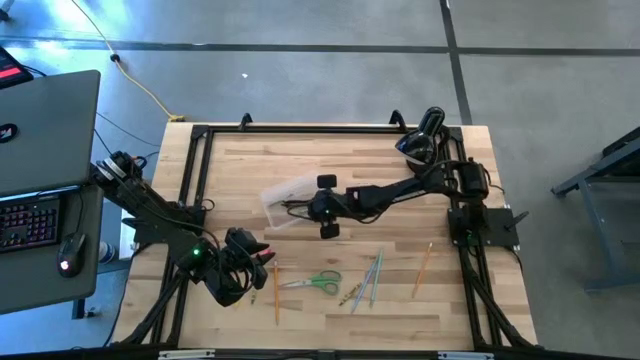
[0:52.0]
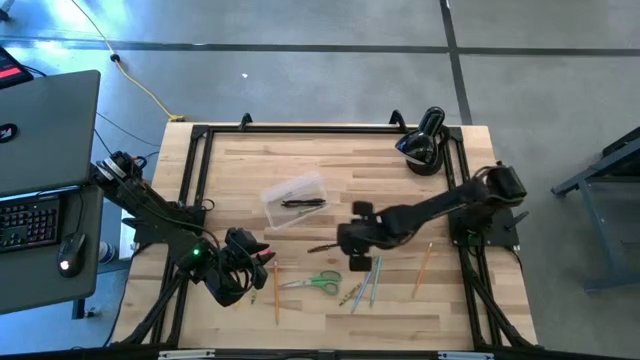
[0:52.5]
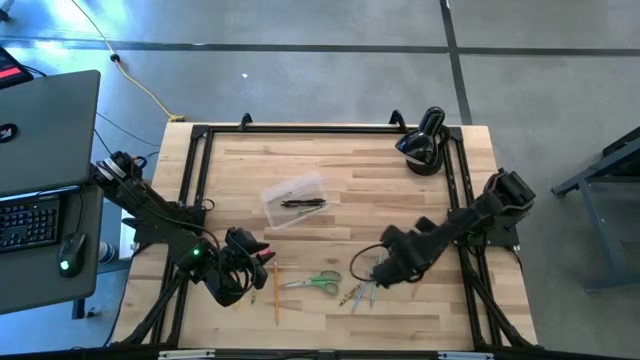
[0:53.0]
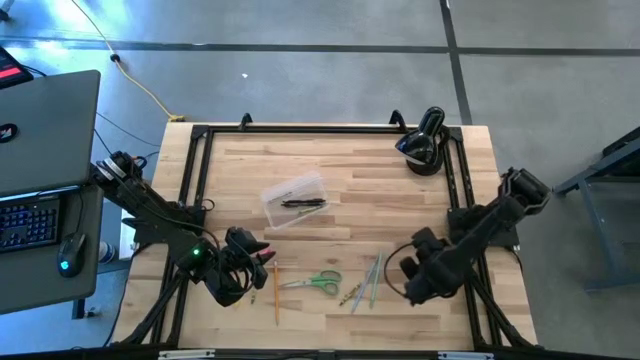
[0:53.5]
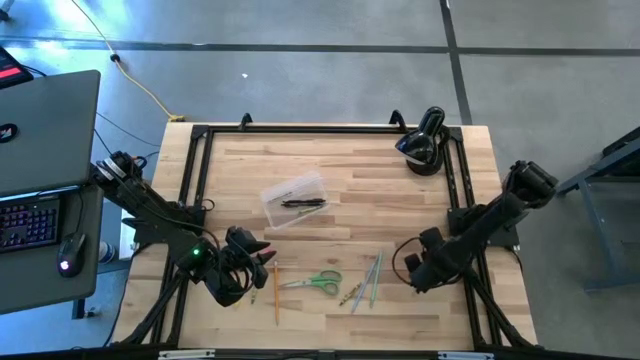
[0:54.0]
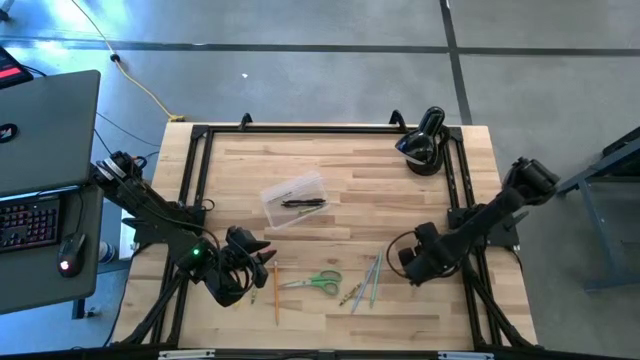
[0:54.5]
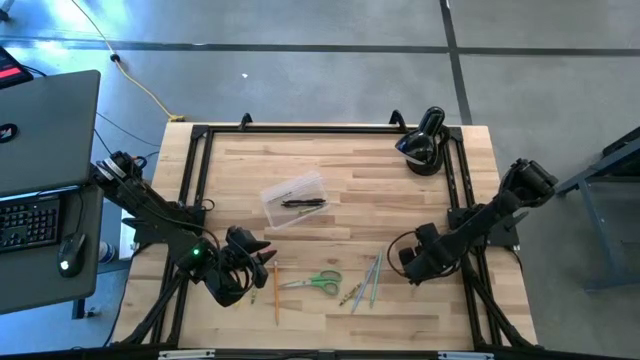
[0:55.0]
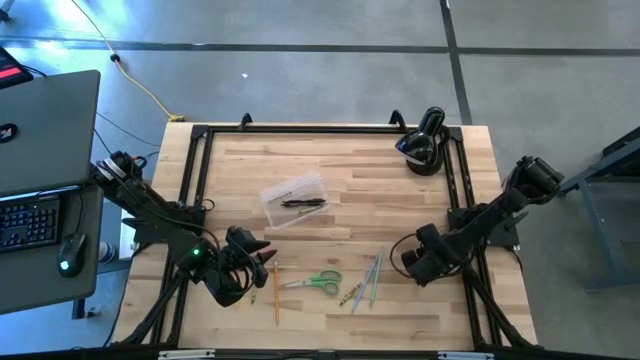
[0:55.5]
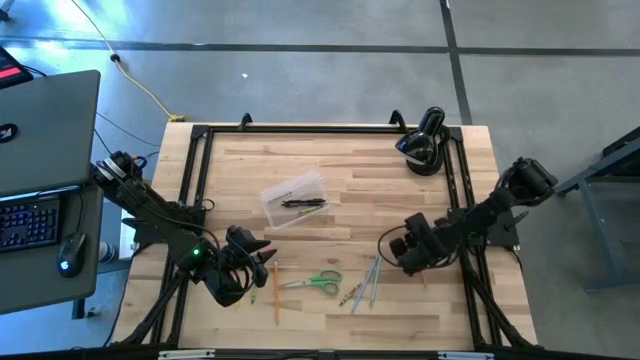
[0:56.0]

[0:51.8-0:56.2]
Task: Pick & place school supplies into a supply box
Put the right yellow pencil into the supply box

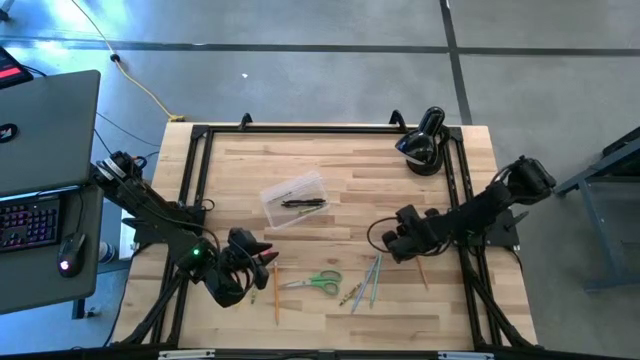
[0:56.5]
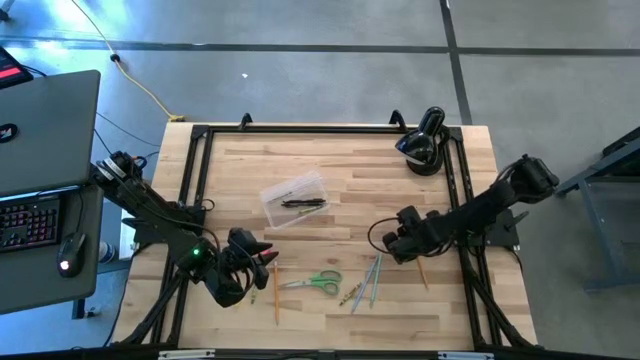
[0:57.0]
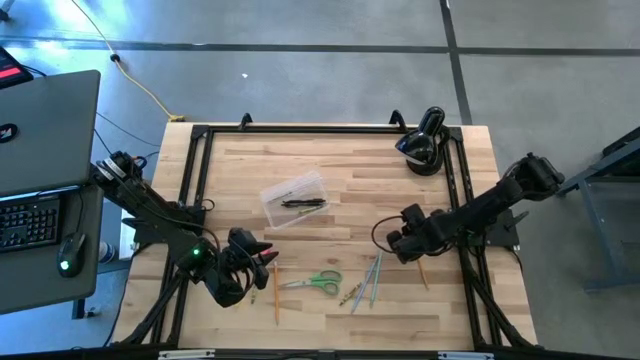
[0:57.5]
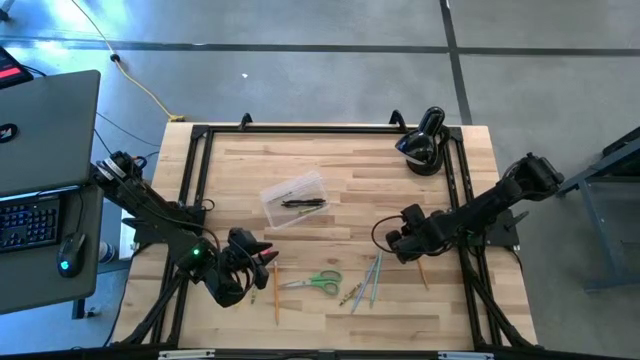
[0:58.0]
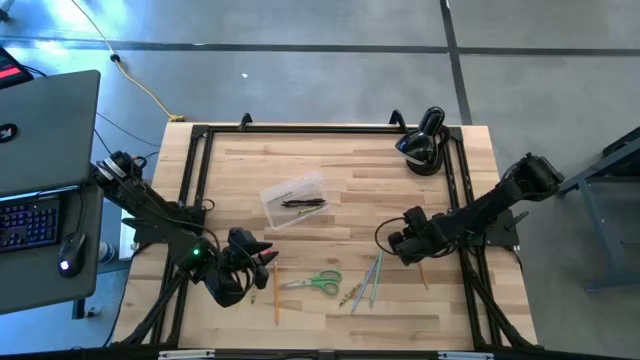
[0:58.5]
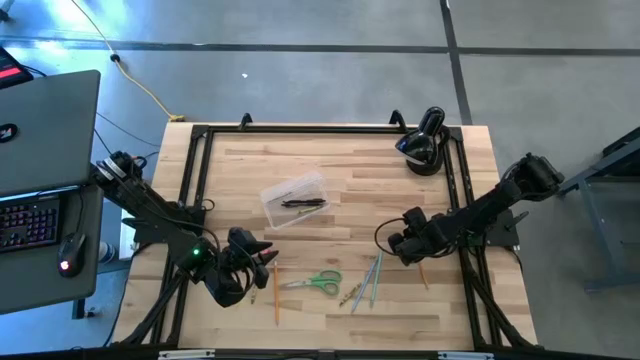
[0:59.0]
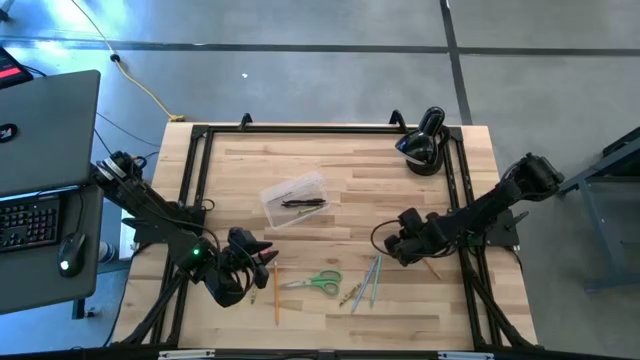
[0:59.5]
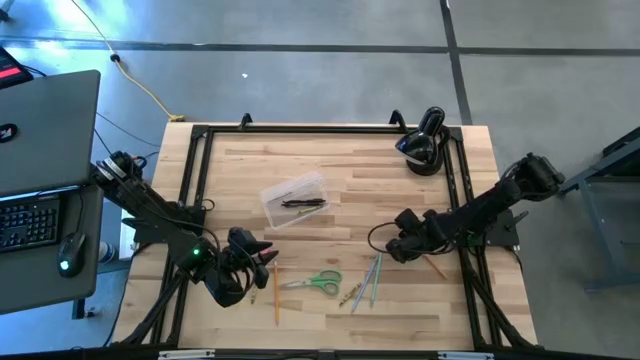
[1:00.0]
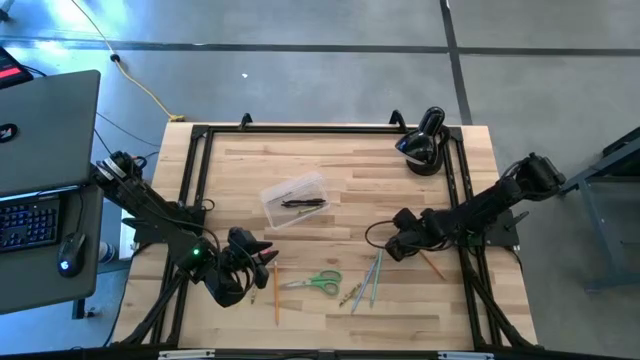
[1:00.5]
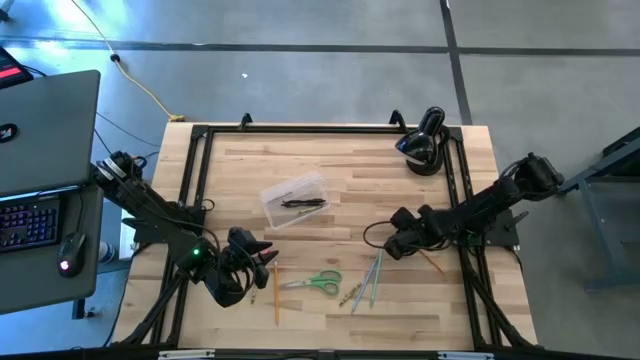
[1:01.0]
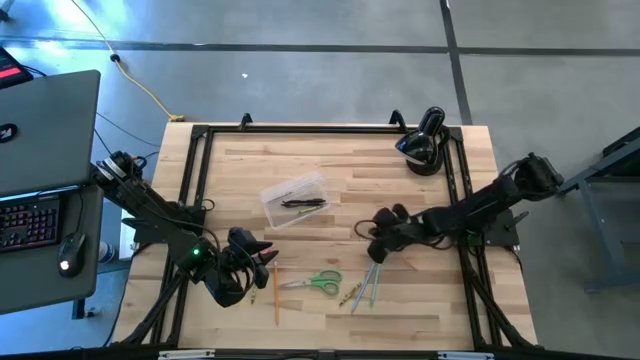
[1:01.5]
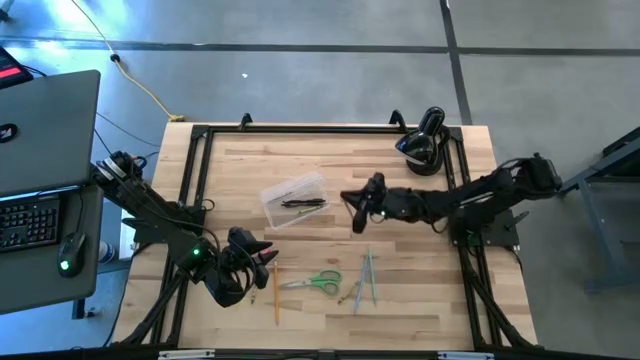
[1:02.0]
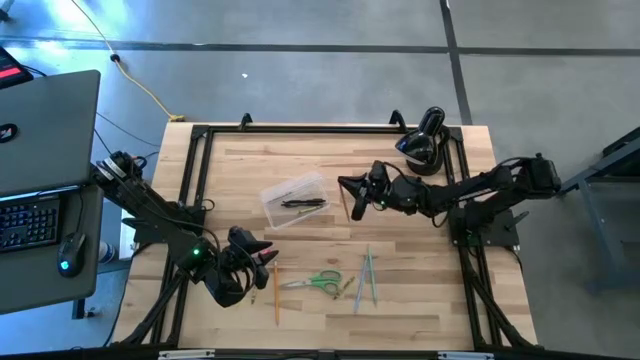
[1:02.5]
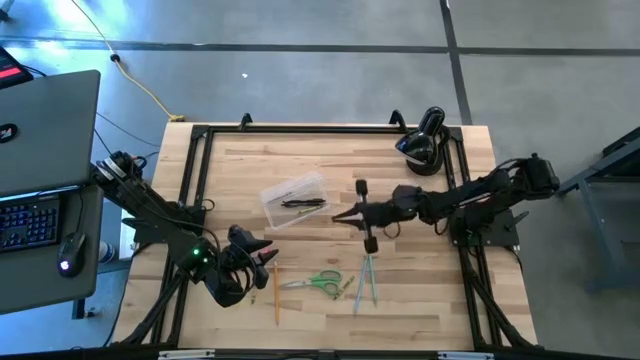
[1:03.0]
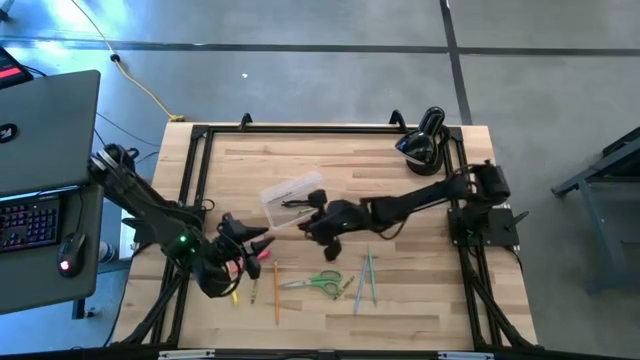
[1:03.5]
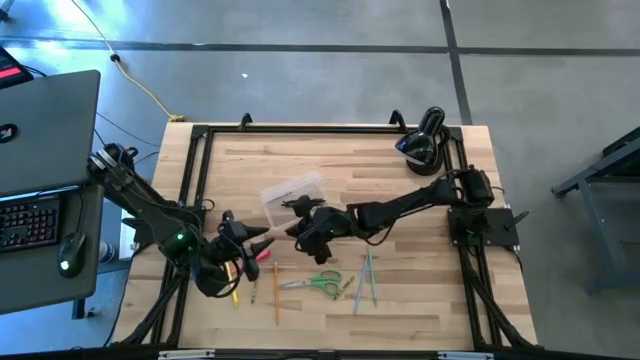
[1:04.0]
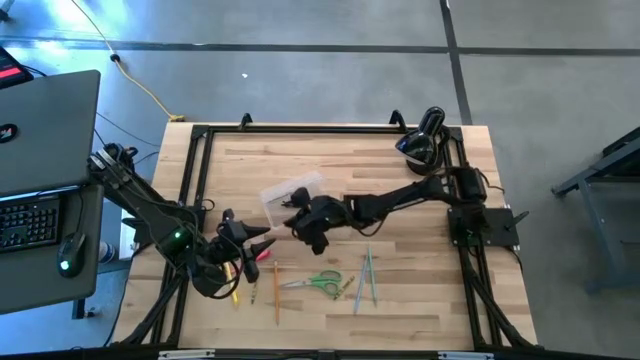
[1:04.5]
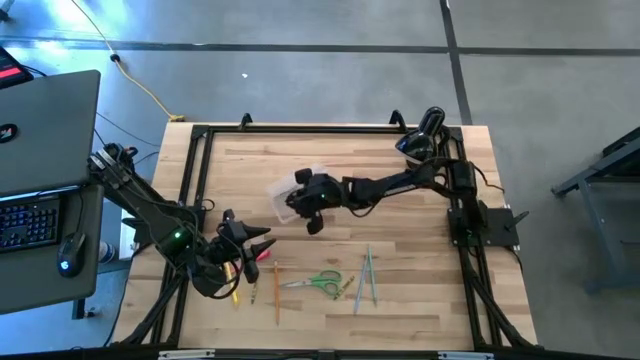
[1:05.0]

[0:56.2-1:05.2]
Put the right yellow pencil into the supply box

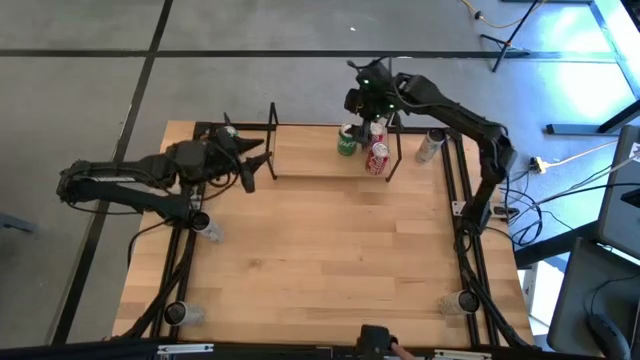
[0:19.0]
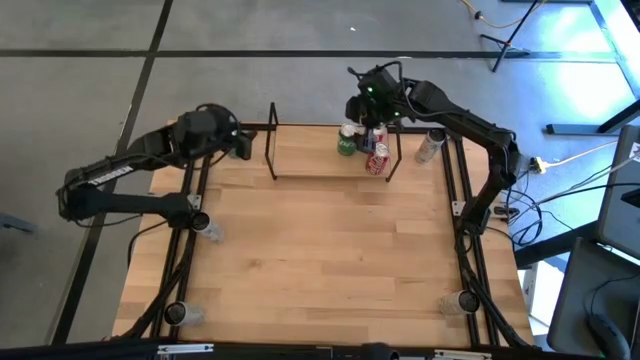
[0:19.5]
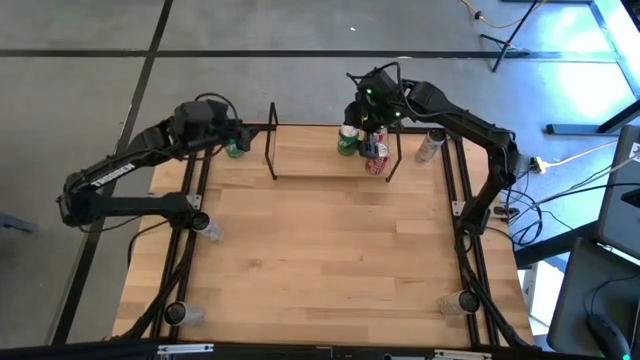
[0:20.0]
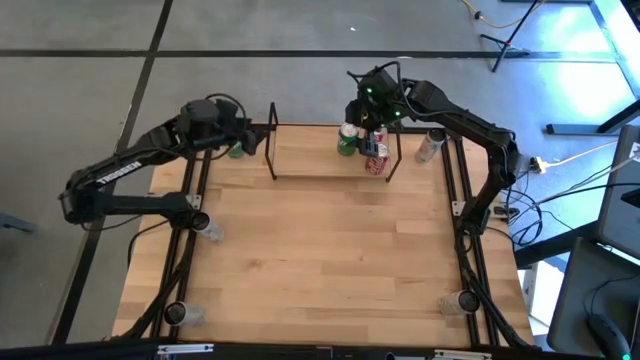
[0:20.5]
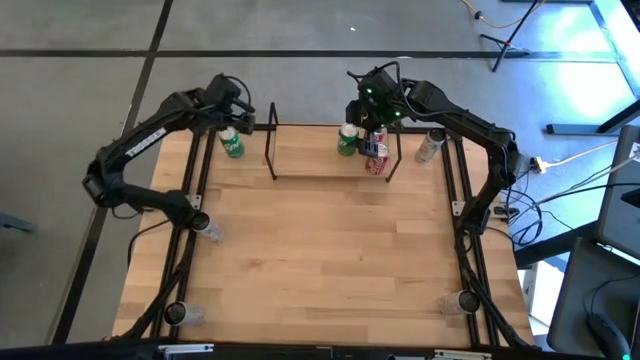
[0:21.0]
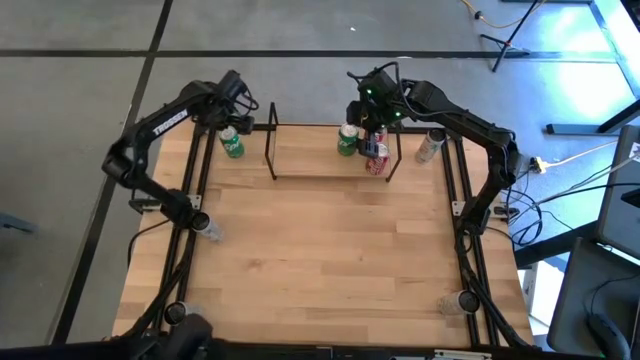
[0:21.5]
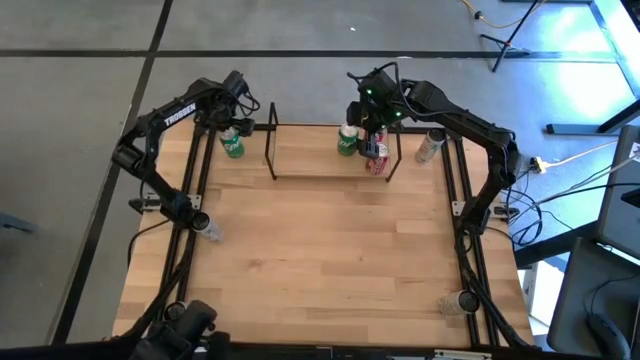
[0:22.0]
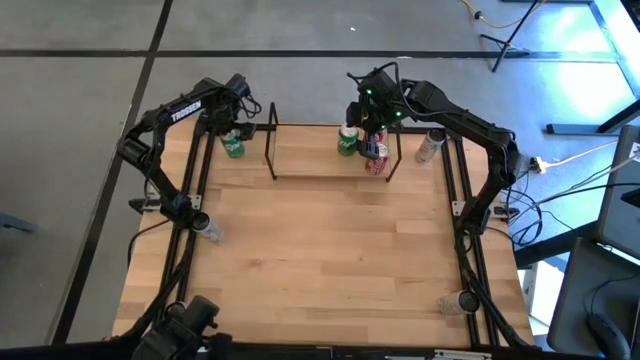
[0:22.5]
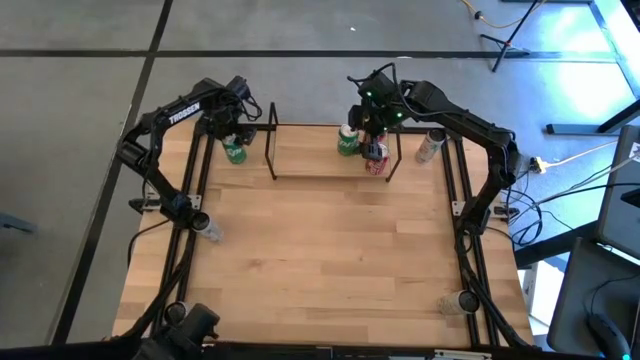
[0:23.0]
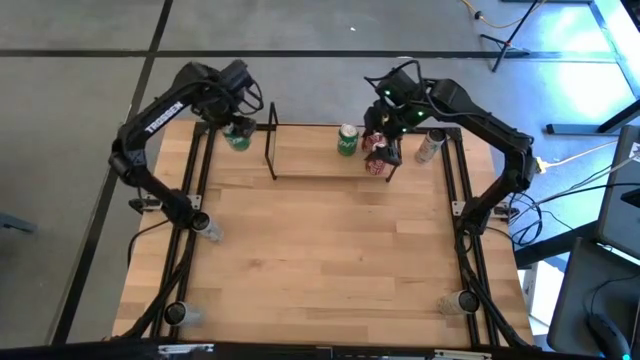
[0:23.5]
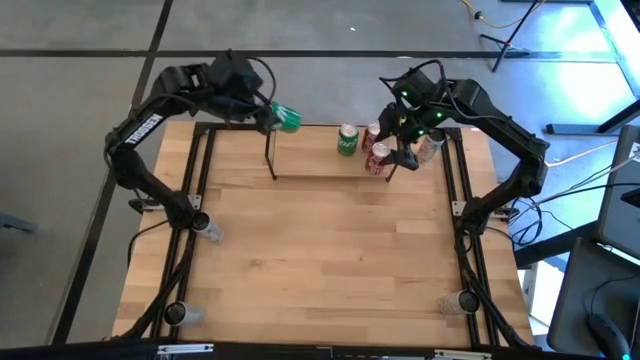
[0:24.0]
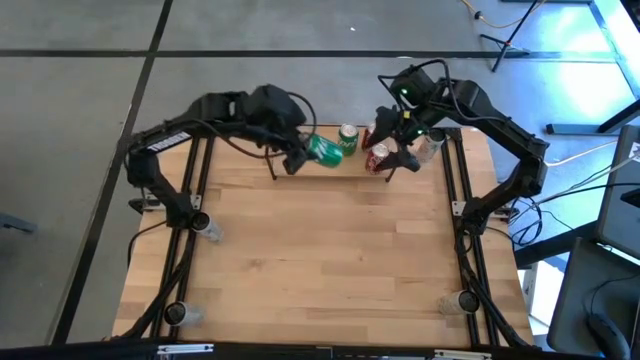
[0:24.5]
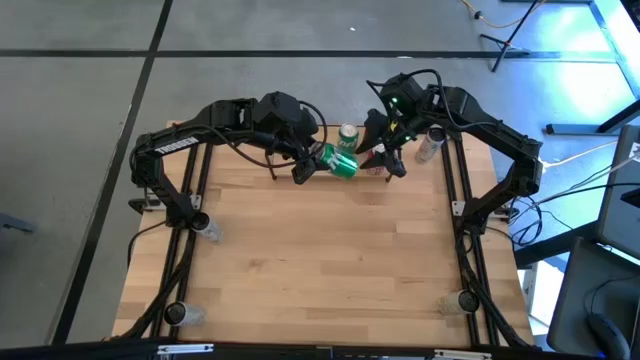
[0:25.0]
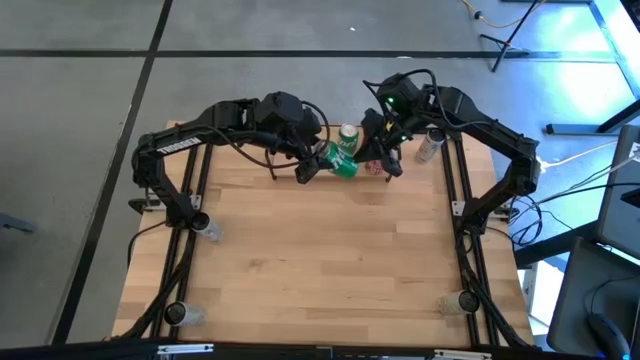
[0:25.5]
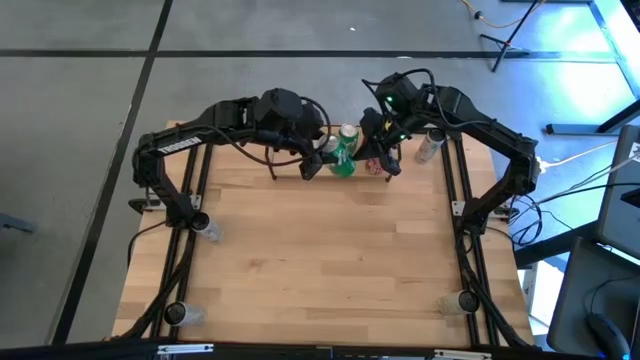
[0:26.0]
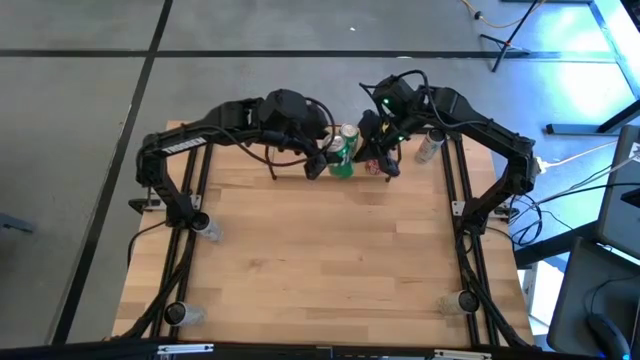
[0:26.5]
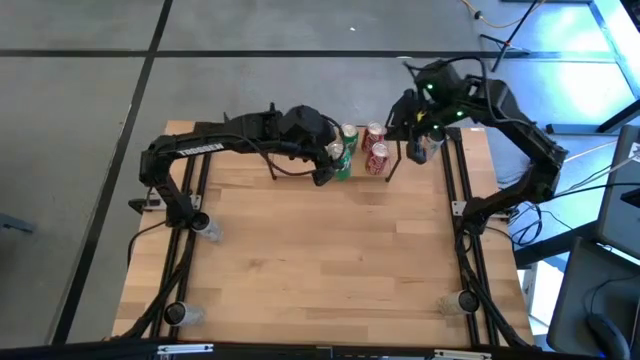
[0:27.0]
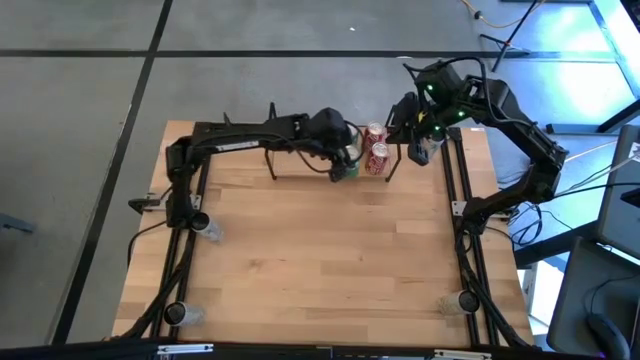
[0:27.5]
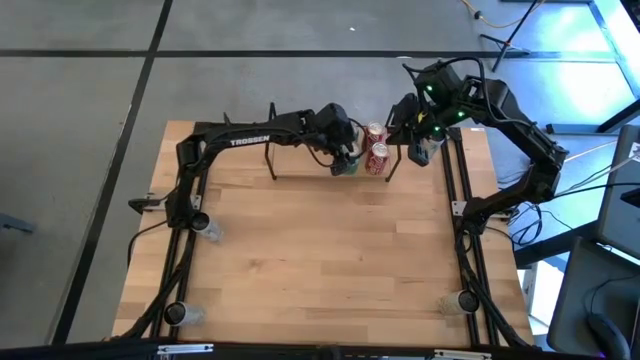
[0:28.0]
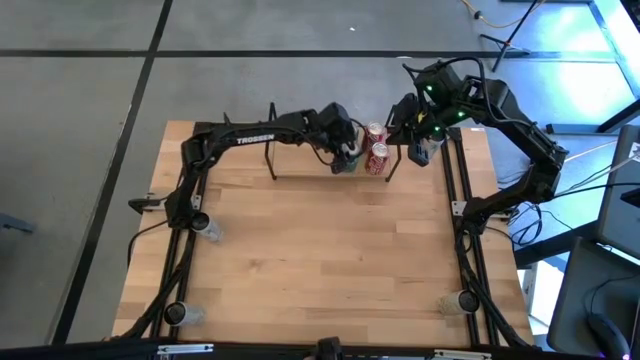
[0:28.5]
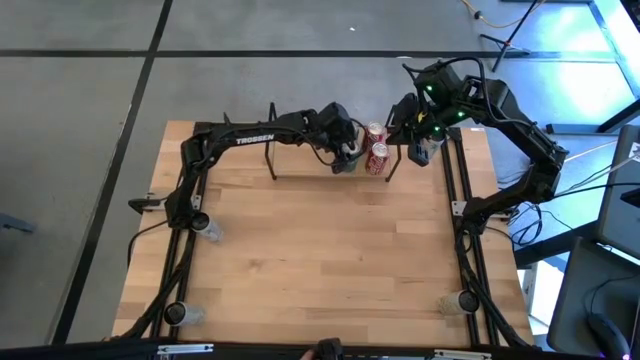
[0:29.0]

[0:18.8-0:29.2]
Task: Place canned beverage on shelf
Put the green soda can on the shelf aligned with the other green soda can
